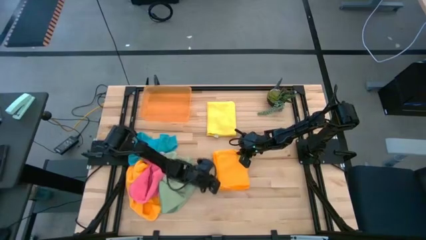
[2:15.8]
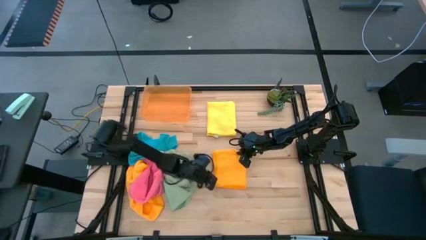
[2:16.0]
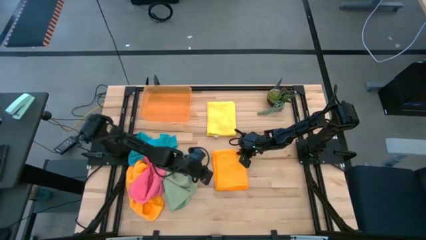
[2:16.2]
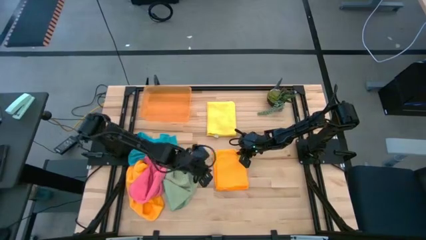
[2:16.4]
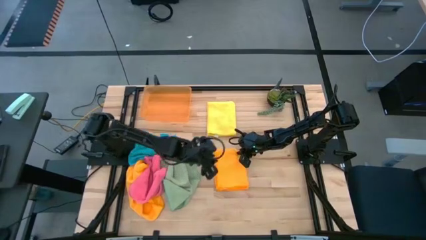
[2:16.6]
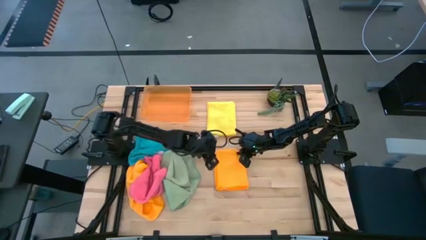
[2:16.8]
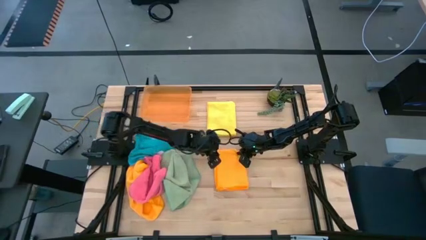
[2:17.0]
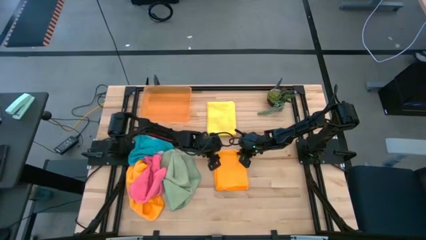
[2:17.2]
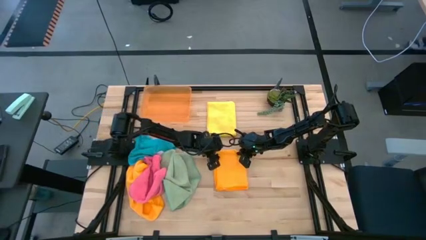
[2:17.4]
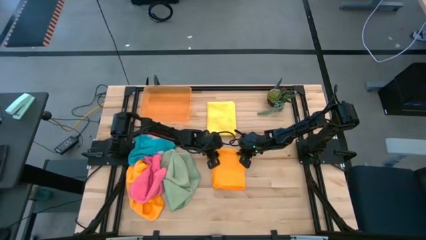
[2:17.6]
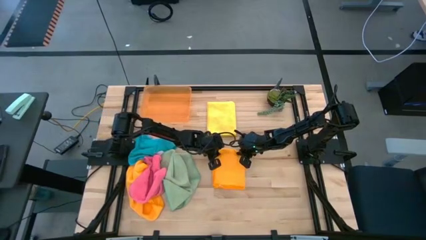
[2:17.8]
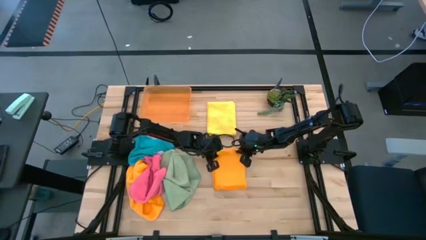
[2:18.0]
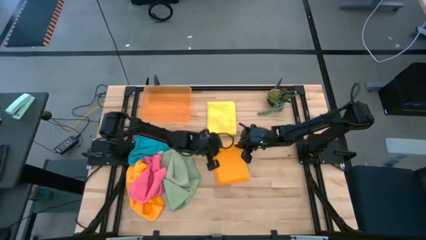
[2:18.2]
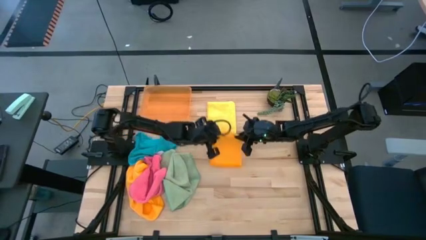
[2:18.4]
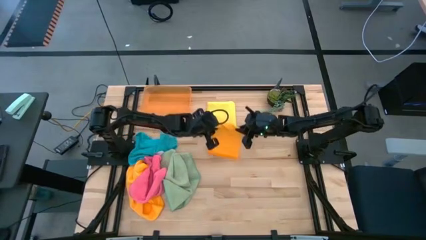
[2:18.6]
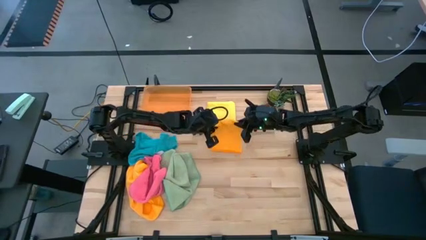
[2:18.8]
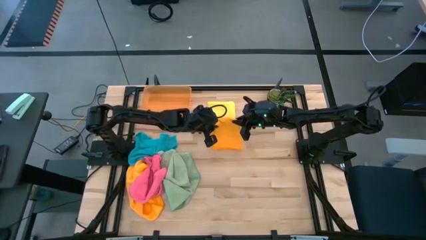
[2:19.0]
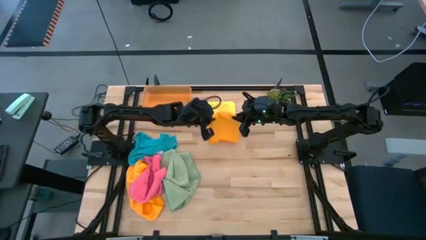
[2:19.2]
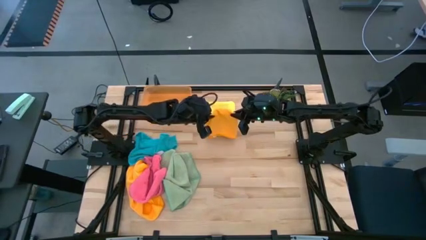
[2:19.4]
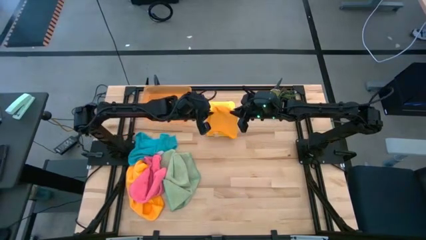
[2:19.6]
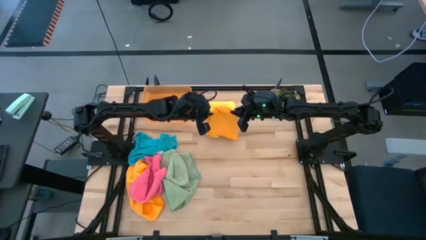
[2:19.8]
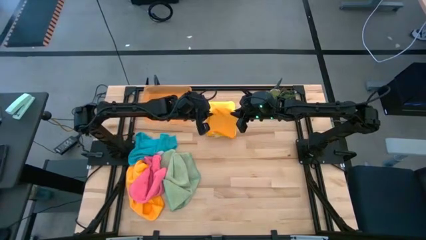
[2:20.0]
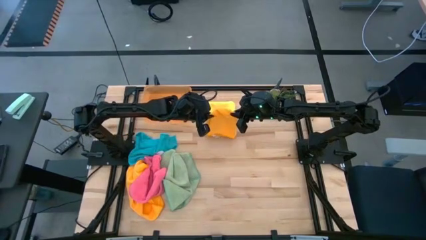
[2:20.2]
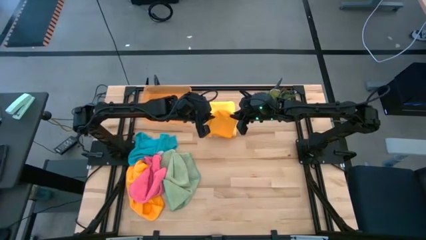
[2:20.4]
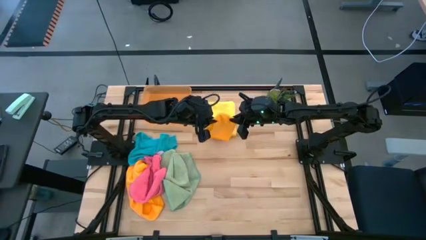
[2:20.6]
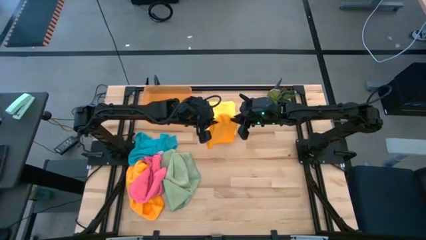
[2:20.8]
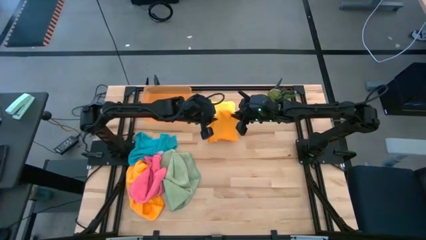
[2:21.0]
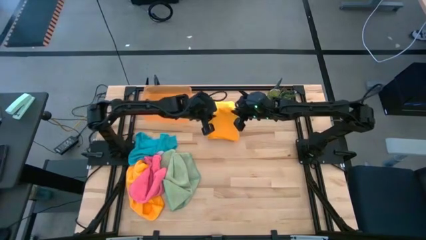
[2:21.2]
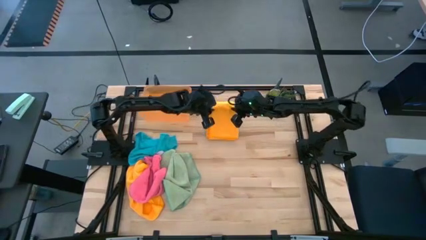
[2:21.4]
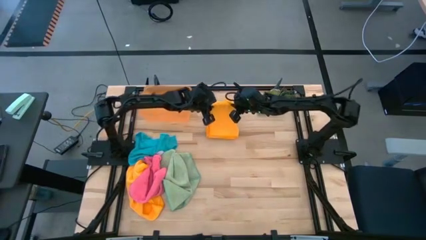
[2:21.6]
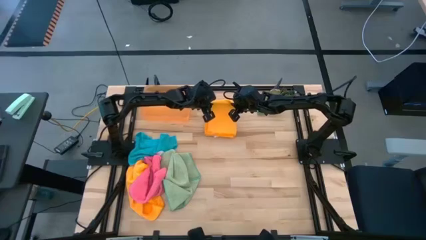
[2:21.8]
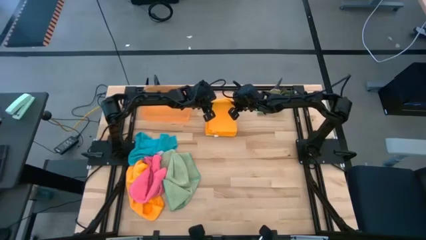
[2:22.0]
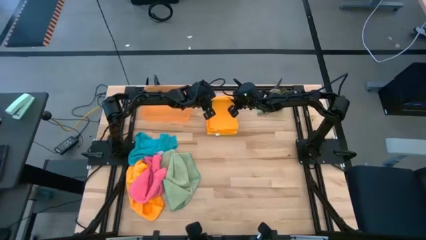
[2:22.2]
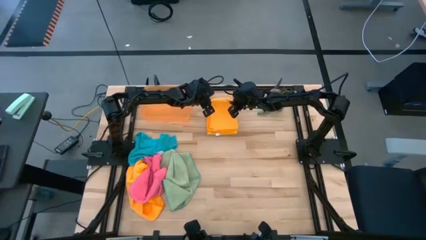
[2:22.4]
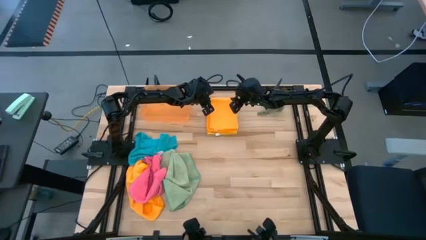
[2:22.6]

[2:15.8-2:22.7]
Task: Fold microfiber towels
Stack the folded orange towel on the folded yellow towel

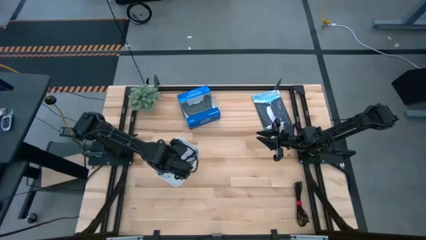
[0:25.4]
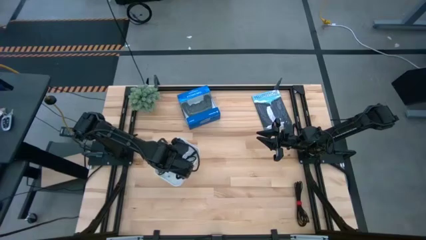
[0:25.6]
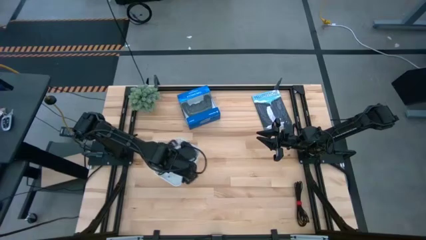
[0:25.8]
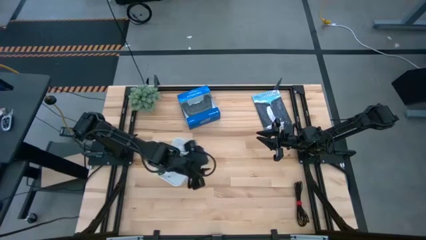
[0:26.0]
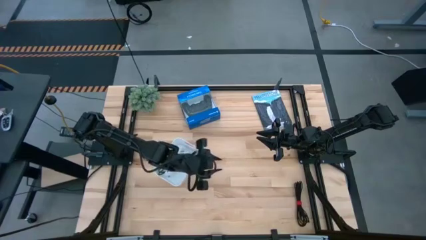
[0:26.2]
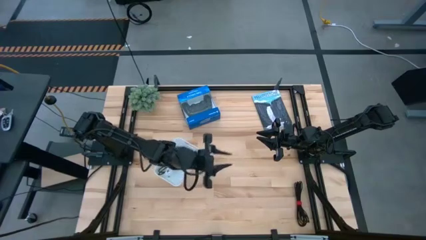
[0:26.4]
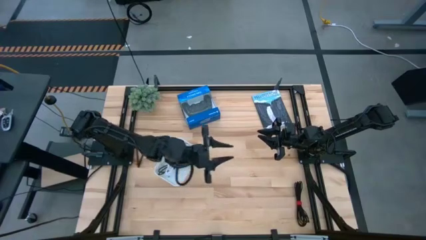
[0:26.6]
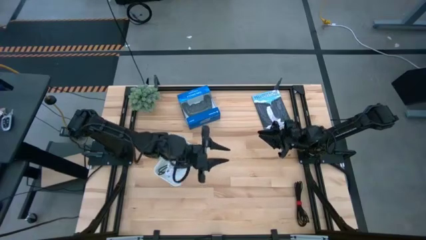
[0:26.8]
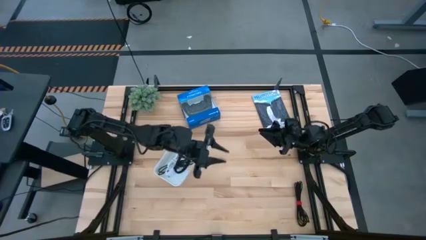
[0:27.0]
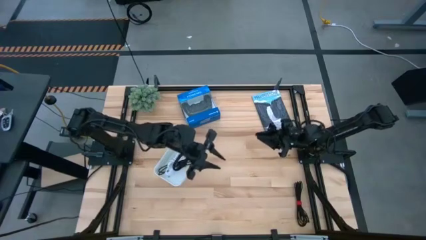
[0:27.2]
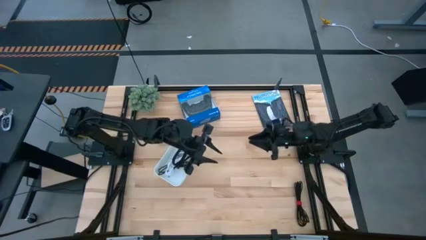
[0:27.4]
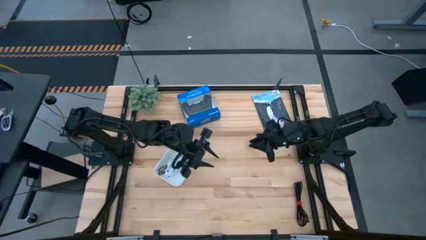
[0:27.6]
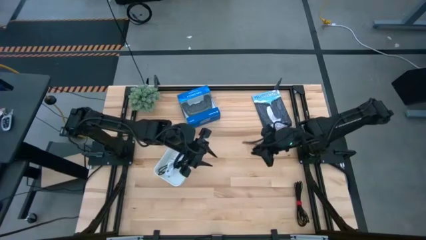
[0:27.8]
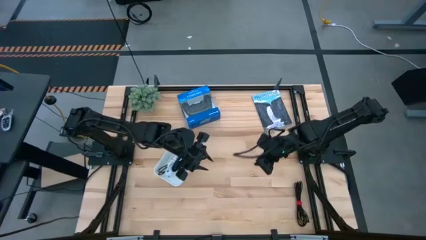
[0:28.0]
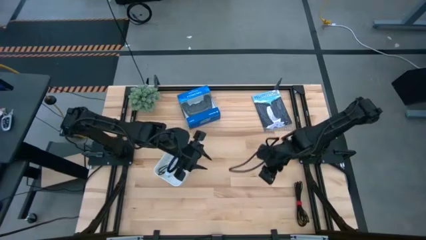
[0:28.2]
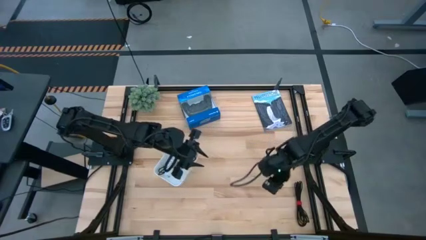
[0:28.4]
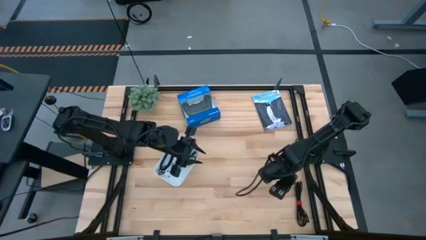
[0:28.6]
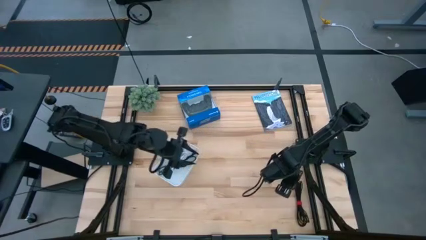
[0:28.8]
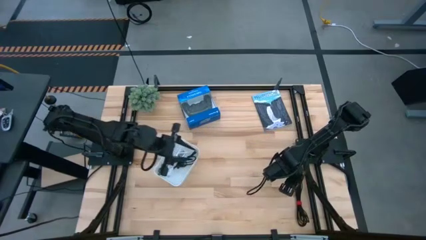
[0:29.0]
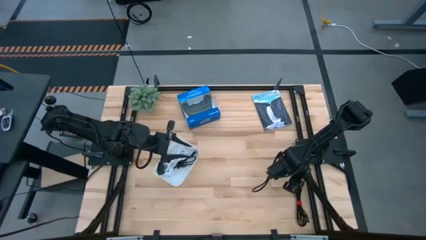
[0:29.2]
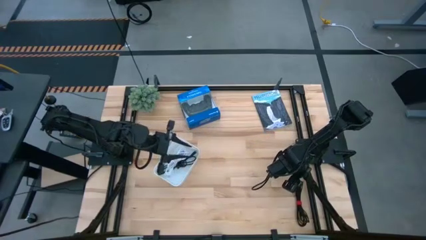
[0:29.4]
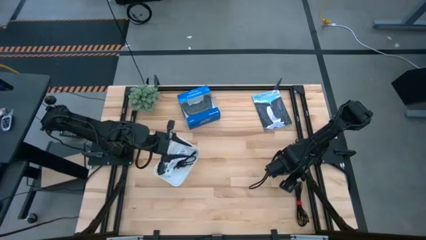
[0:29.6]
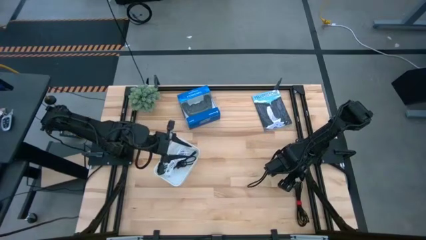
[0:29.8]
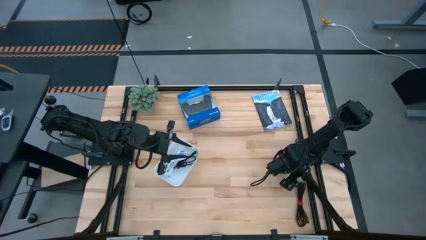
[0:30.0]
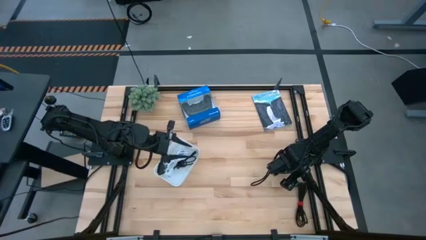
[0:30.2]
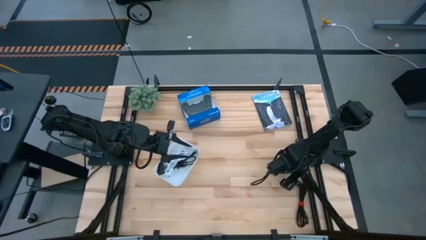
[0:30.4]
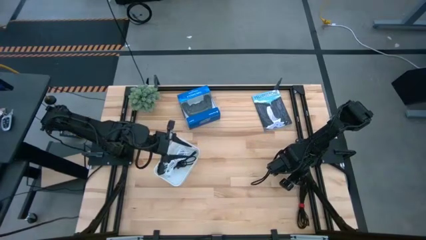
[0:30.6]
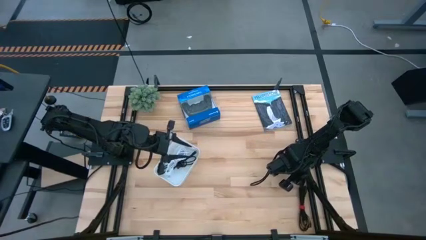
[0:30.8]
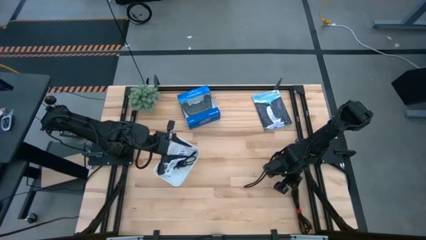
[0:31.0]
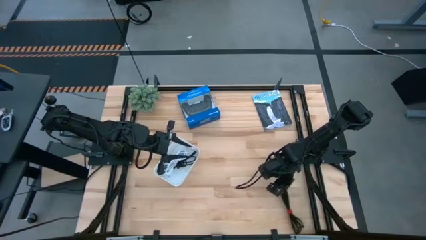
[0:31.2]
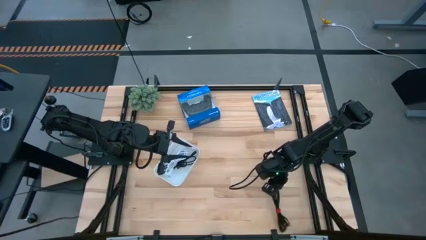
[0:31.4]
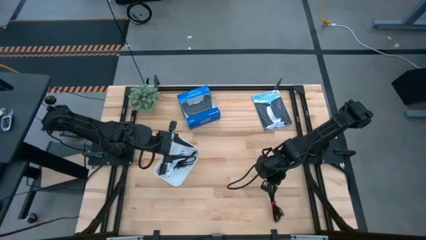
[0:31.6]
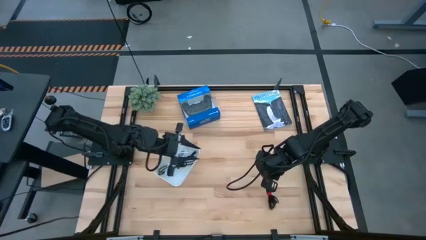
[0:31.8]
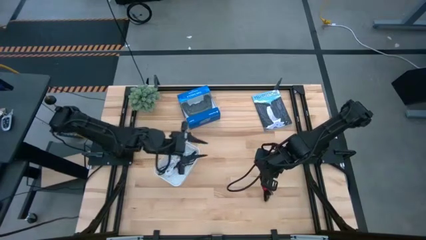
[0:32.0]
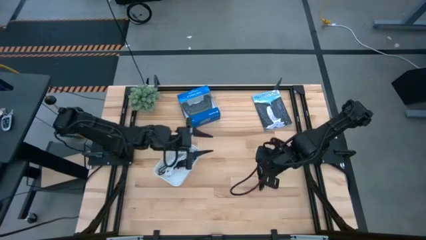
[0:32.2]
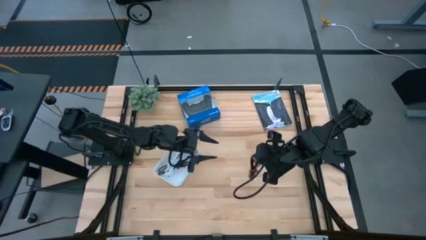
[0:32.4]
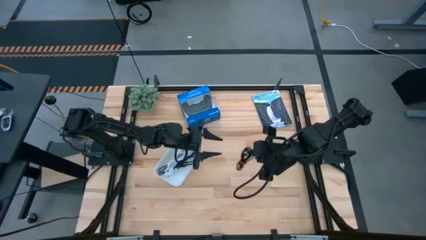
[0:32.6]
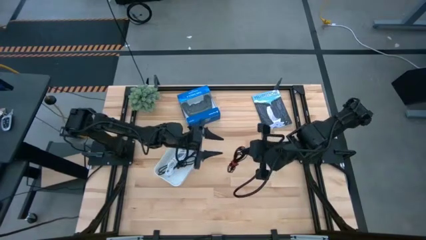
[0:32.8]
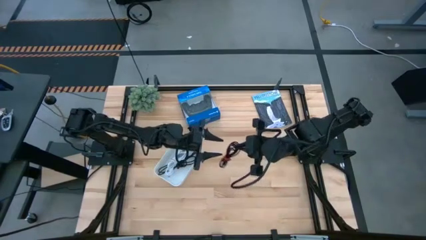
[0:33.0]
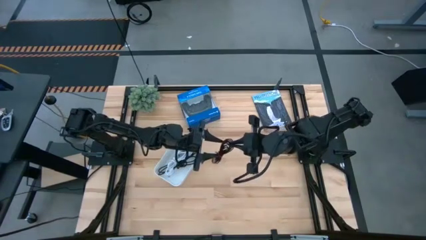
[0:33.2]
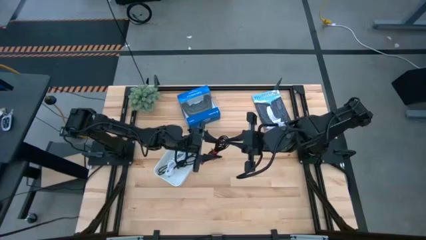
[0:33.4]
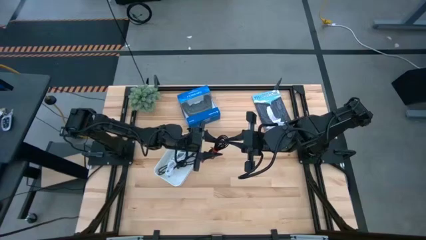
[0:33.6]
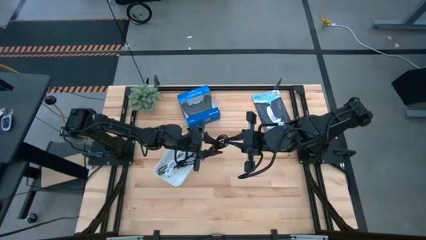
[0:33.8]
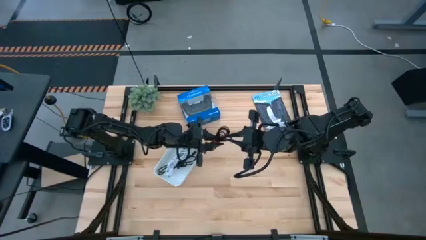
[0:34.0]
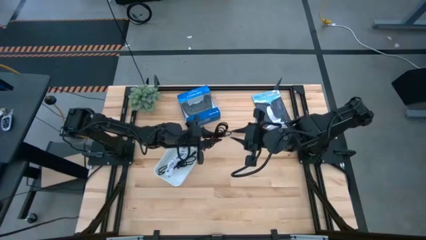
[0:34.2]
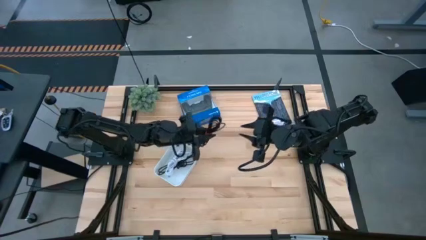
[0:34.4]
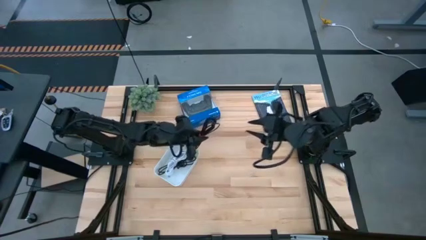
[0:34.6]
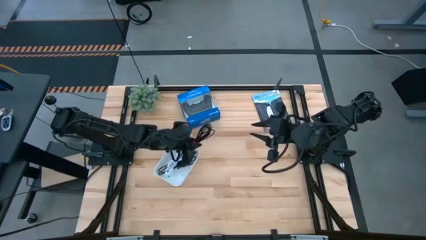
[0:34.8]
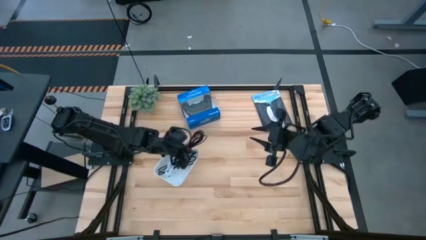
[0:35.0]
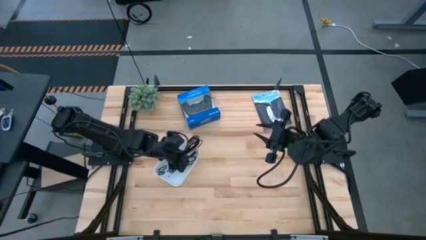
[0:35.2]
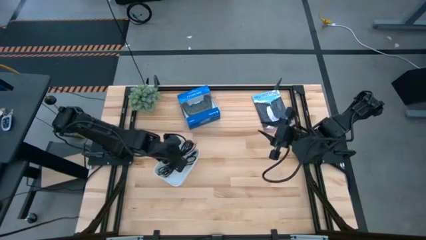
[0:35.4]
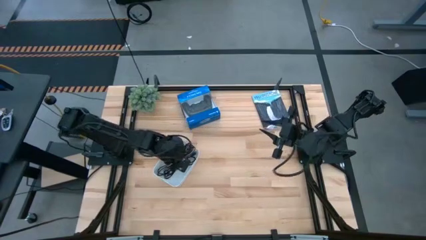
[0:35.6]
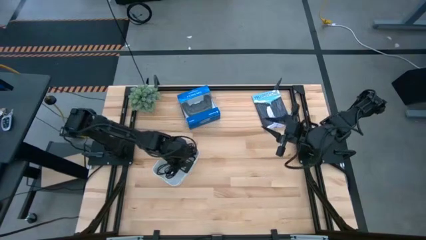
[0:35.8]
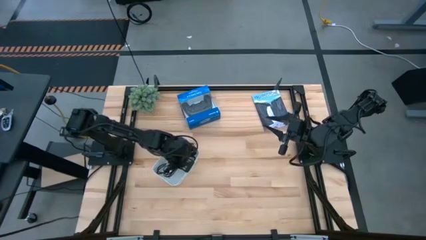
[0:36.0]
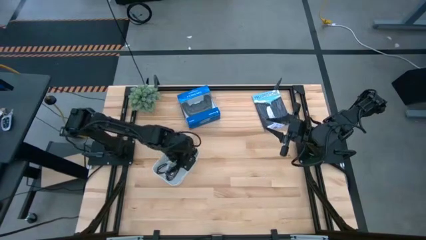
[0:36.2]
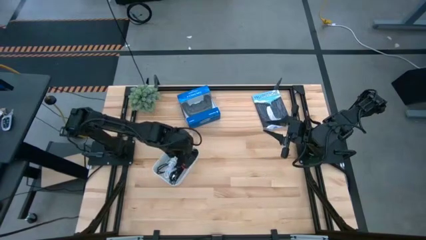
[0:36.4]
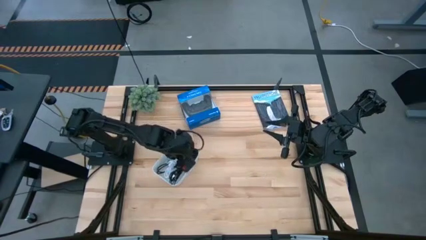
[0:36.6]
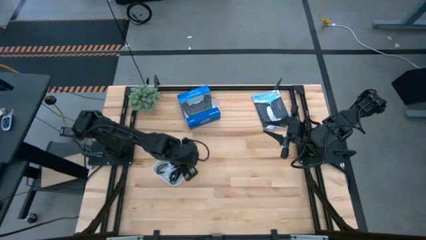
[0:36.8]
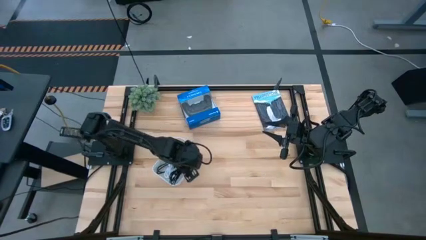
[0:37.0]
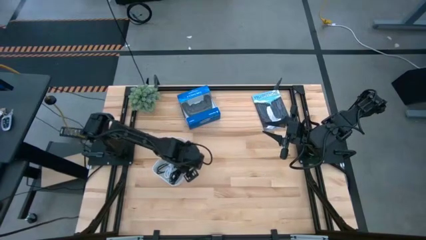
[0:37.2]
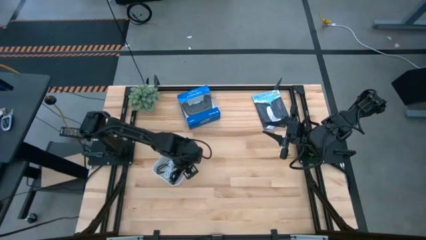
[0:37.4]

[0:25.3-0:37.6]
Task: Pick and place USB-C Cables
Put the black charger cable into the white bin
